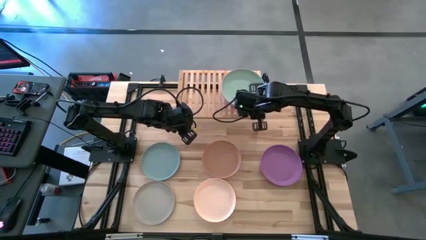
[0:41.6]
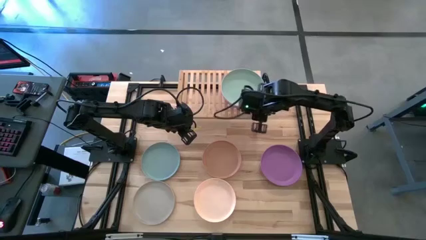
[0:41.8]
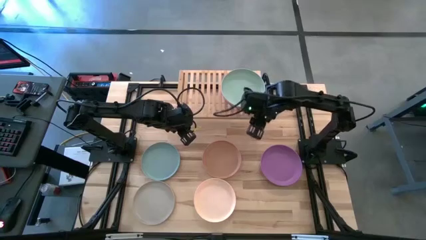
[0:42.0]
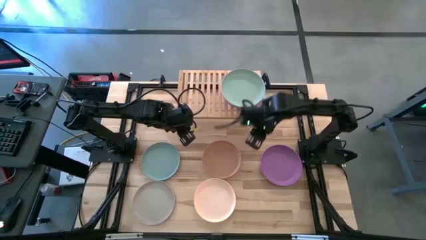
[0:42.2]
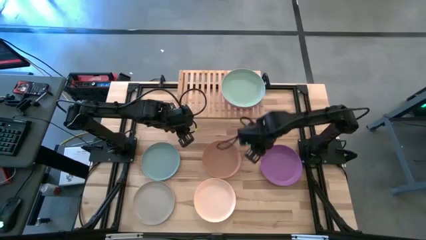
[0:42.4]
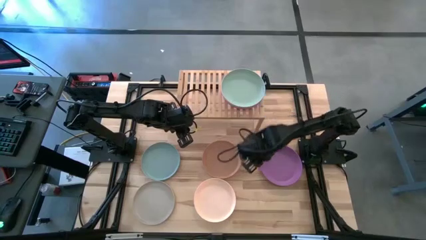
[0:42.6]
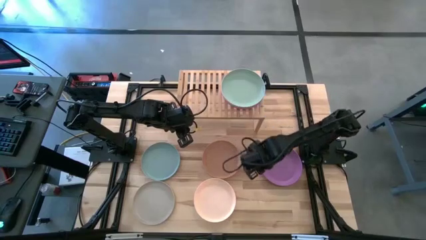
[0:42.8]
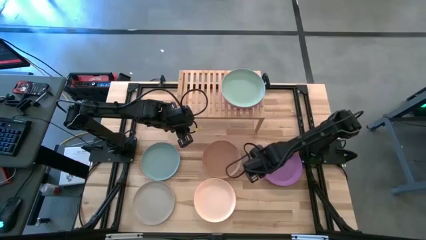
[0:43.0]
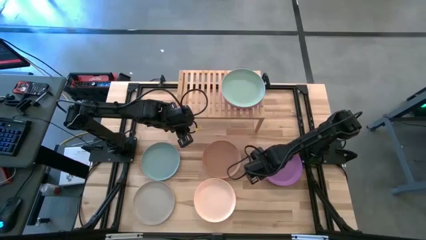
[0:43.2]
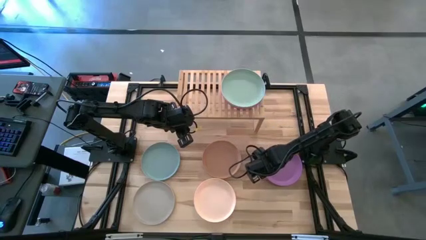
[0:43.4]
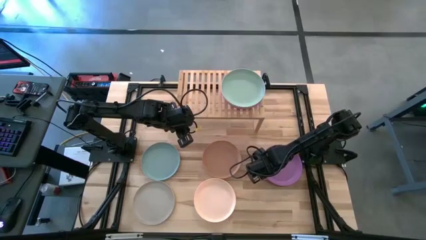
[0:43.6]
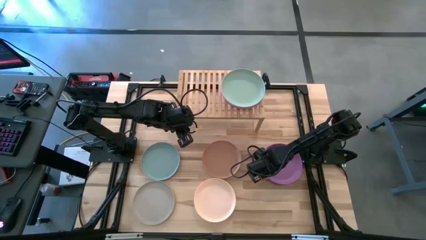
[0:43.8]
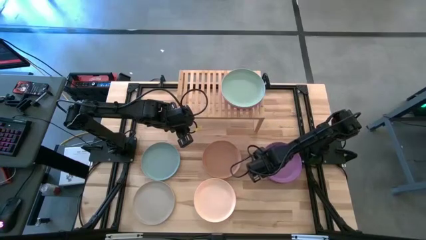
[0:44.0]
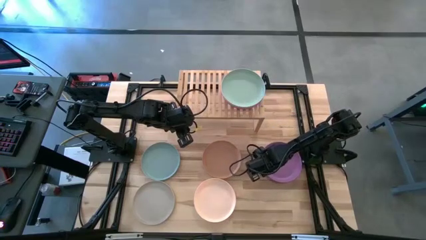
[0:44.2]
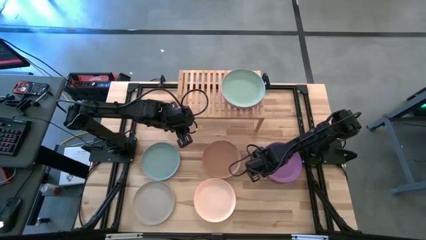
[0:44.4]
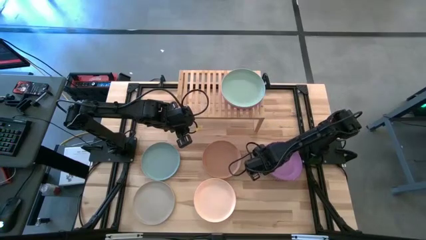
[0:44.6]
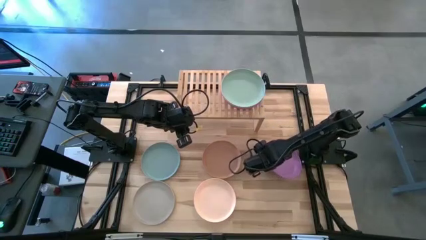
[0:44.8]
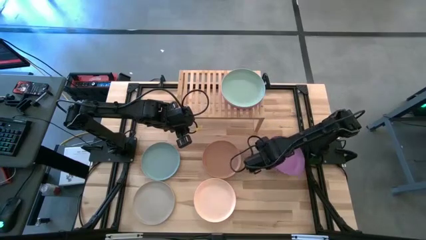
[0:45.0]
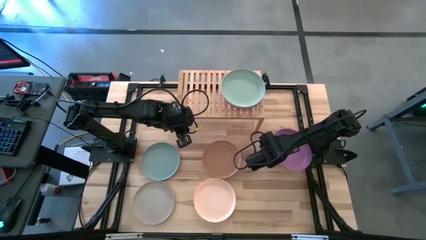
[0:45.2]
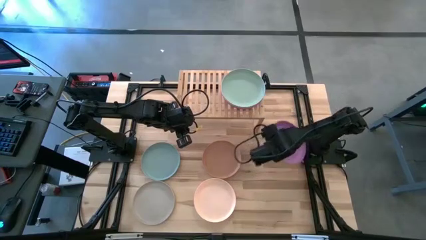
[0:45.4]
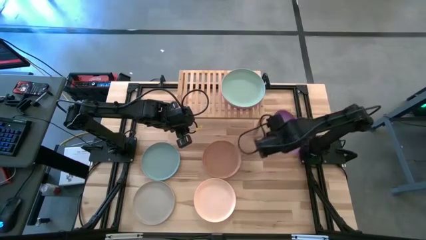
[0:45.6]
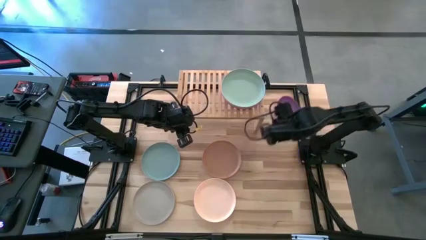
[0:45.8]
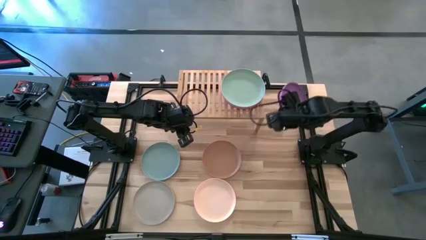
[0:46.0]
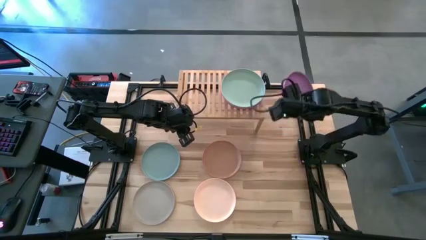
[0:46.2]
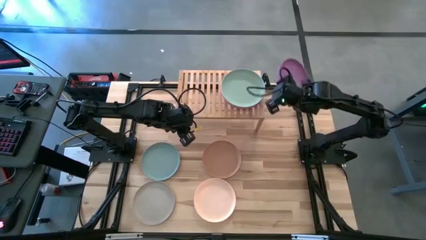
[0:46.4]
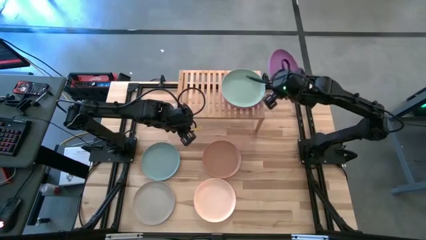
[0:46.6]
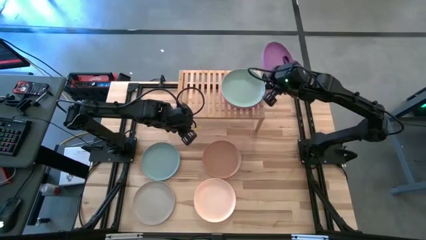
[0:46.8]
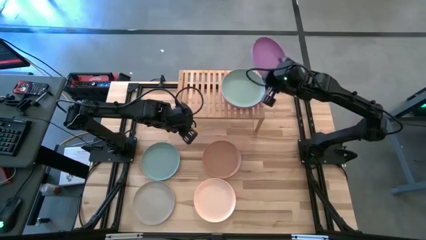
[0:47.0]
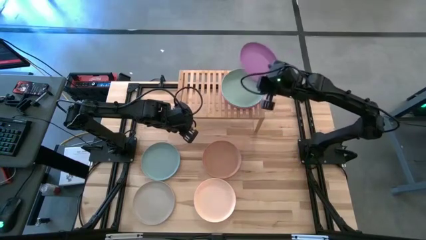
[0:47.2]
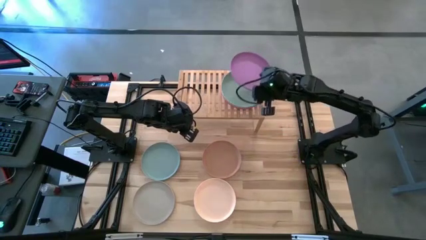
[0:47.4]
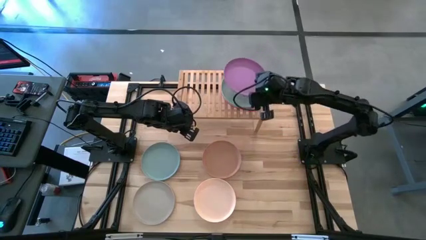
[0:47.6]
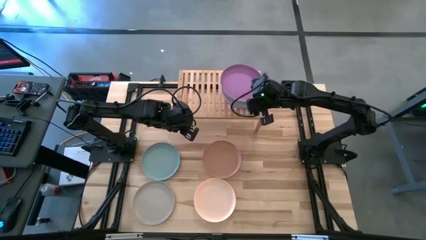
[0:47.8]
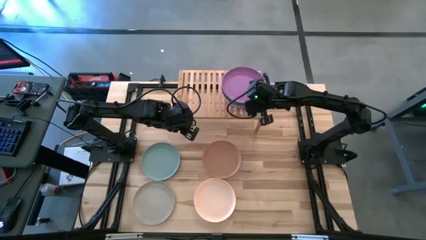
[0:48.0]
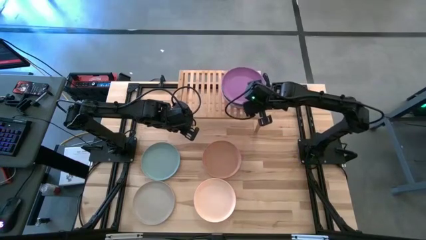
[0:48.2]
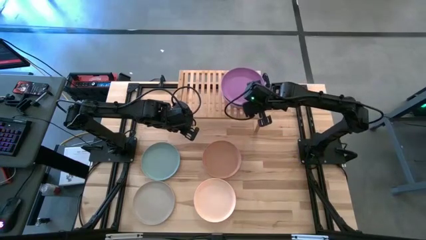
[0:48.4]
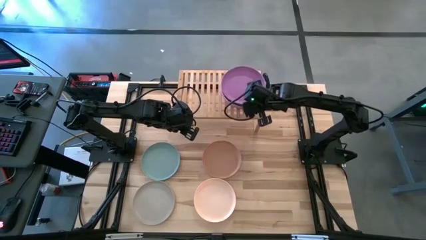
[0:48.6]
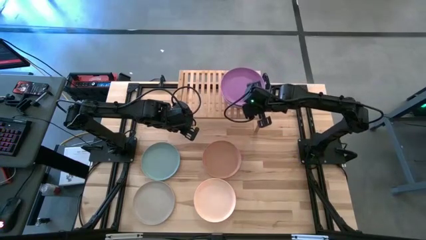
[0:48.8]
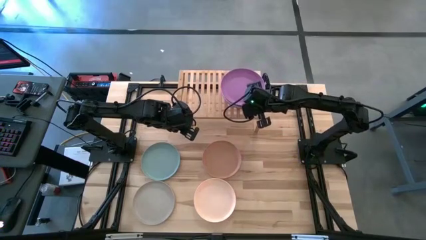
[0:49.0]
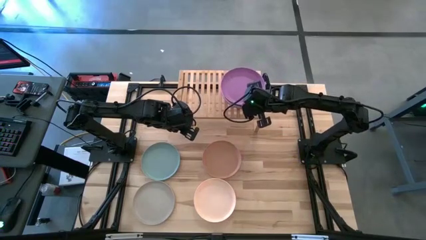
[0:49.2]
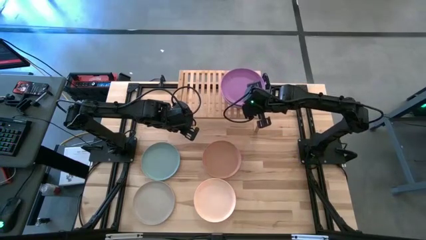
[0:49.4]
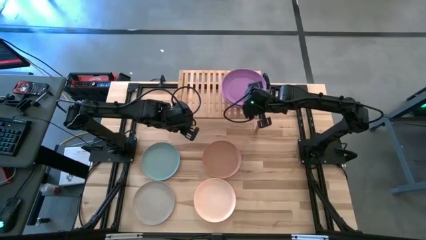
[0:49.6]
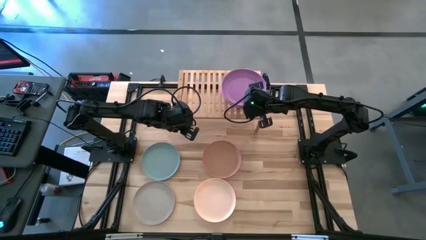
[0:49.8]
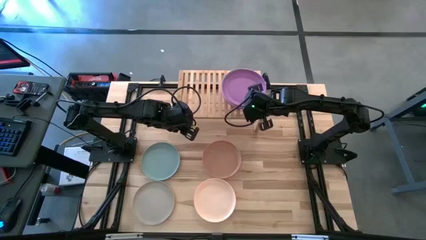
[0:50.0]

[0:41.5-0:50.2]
Task: Place and stack plates onto a shelf
Stack the violet plate on top of the green on the shelf

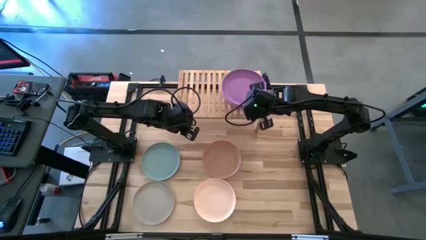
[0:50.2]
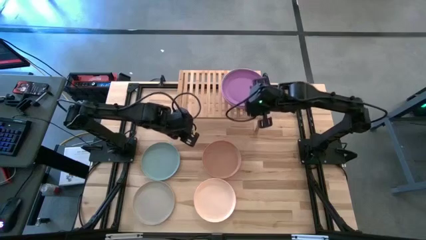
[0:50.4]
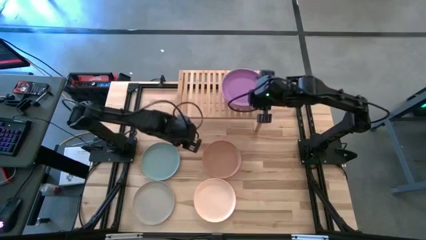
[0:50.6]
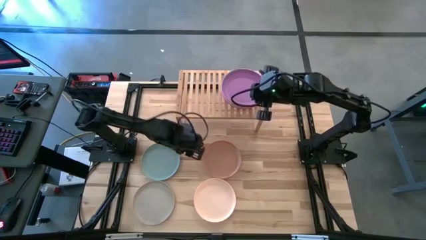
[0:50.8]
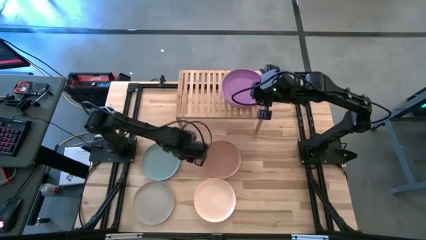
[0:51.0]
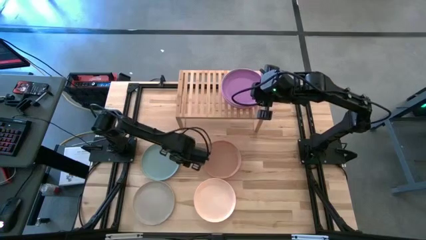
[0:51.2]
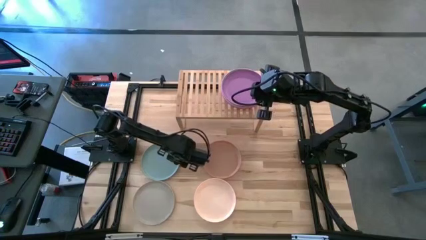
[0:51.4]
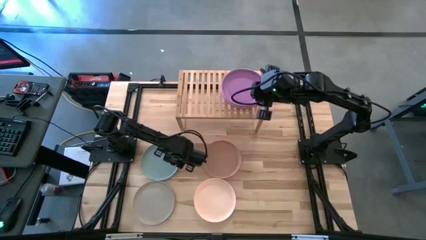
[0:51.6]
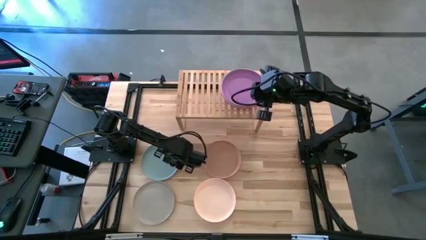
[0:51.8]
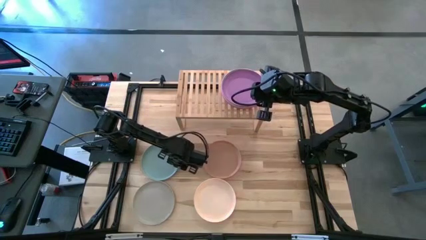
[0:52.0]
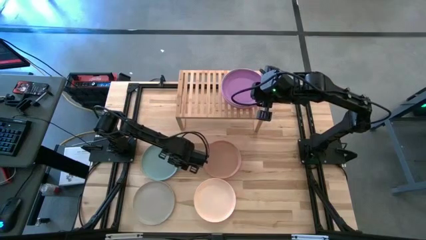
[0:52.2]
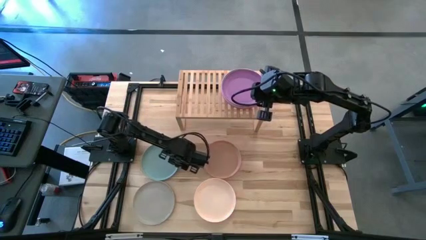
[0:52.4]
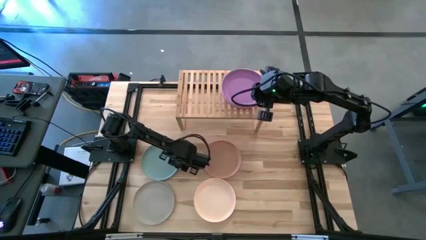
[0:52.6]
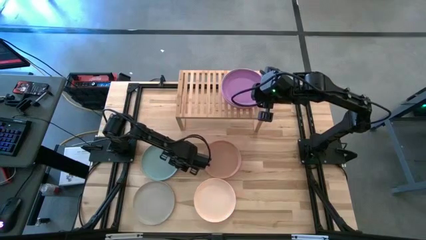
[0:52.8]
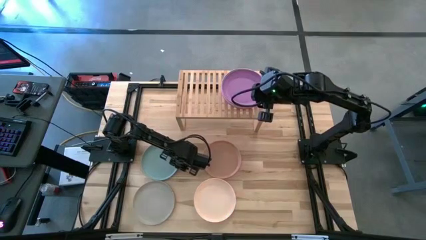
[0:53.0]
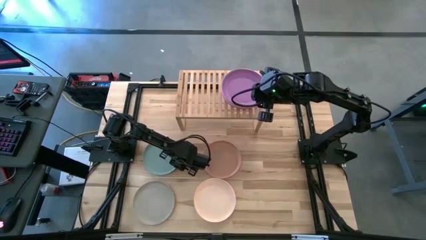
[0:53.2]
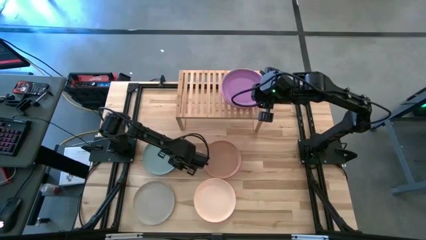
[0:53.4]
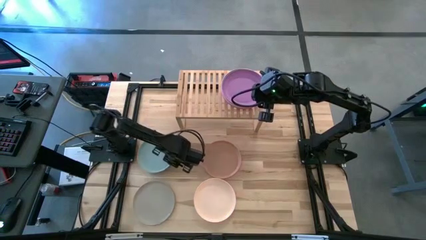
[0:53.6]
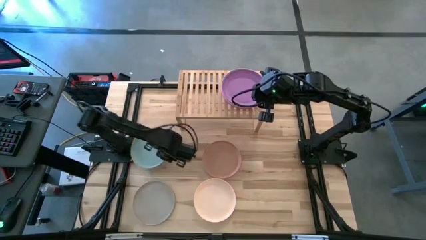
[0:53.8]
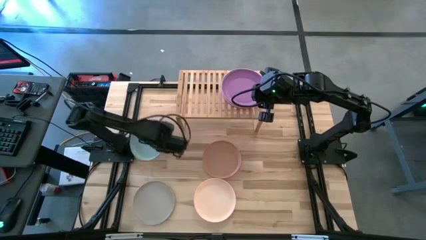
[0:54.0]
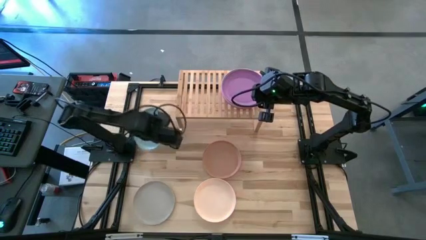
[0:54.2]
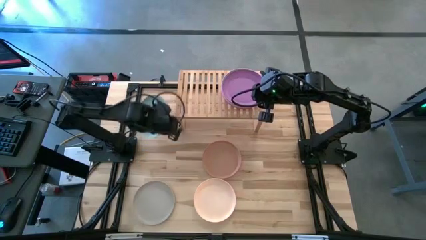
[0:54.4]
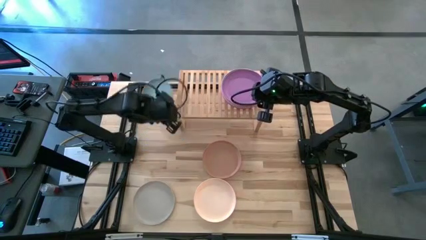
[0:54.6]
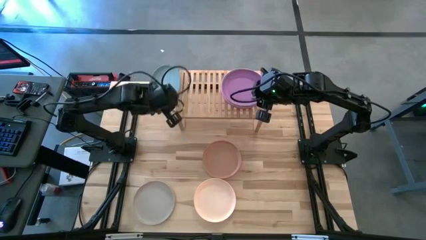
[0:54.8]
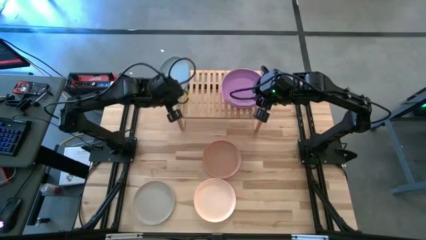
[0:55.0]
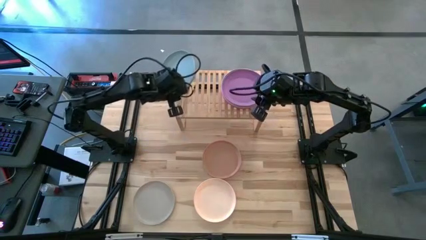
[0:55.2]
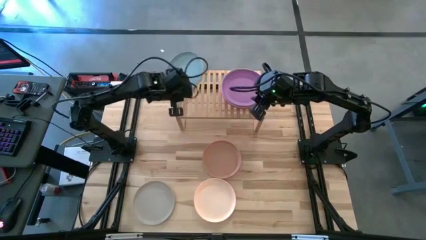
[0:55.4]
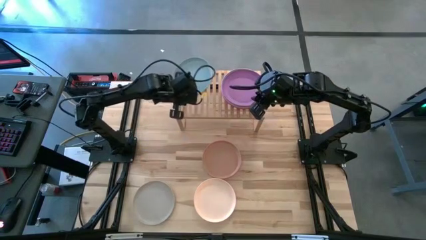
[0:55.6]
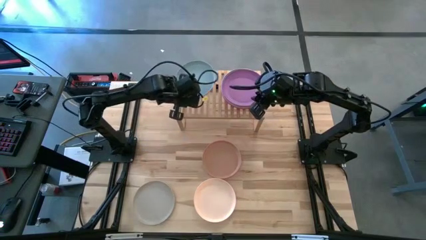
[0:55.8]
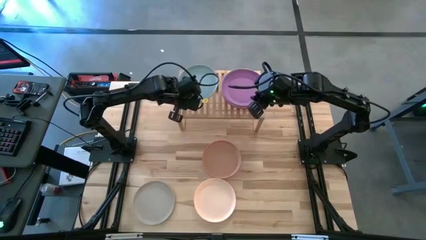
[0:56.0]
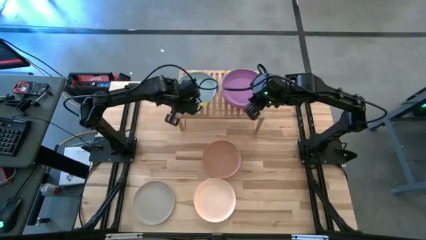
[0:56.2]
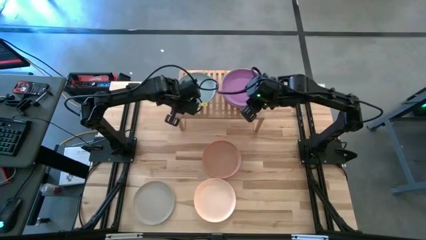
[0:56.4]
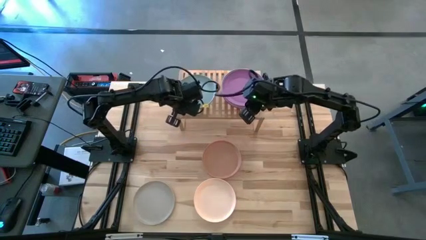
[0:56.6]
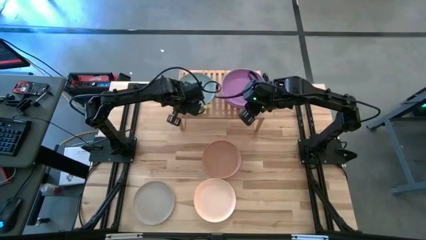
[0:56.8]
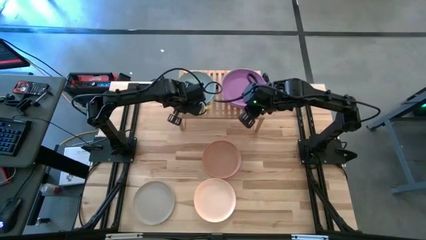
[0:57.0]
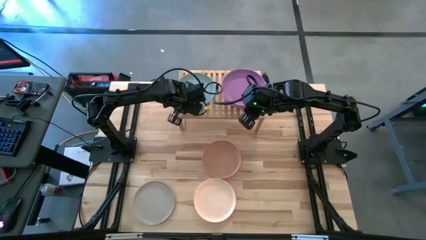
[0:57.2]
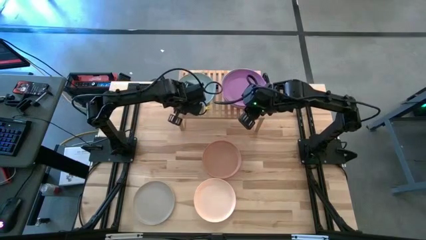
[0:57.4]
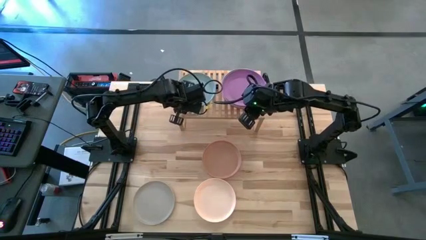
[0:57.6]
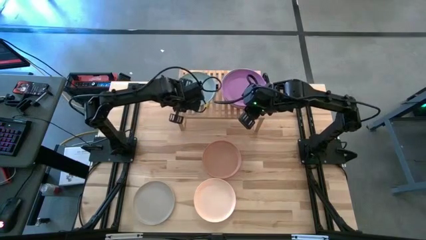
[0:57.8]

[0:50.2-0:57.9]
Put the blue plate on the shelf
